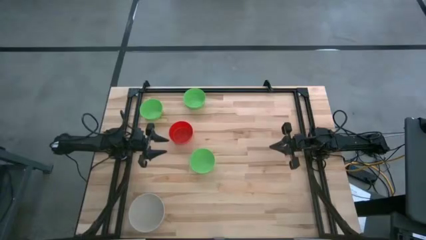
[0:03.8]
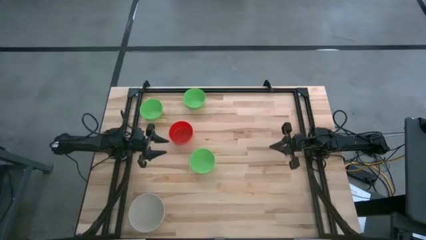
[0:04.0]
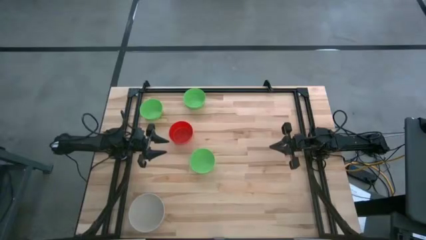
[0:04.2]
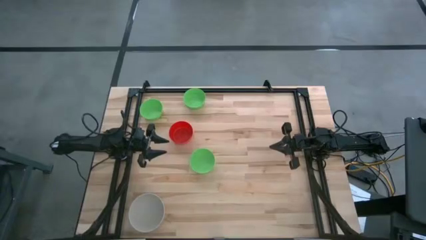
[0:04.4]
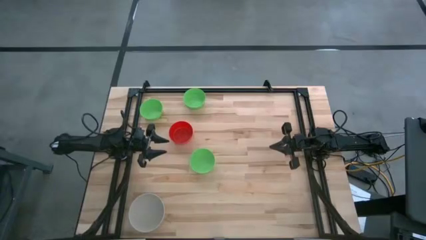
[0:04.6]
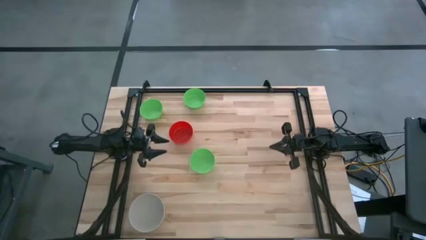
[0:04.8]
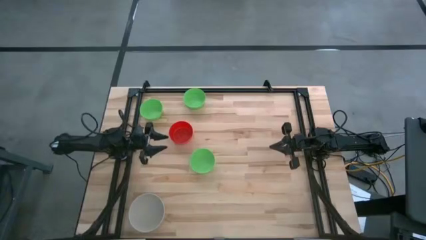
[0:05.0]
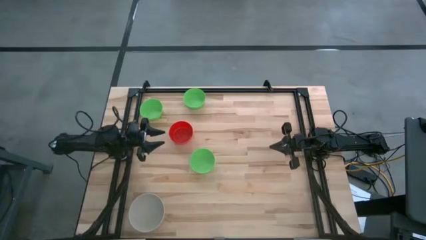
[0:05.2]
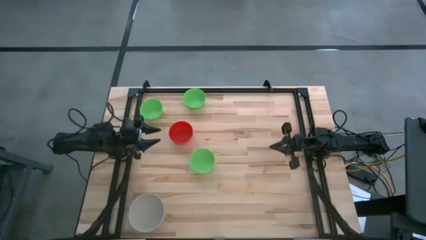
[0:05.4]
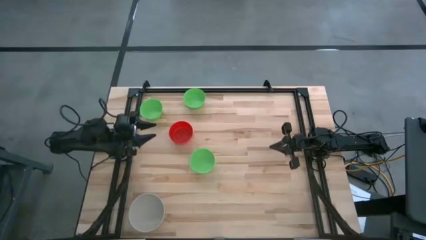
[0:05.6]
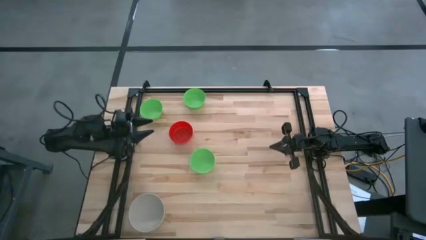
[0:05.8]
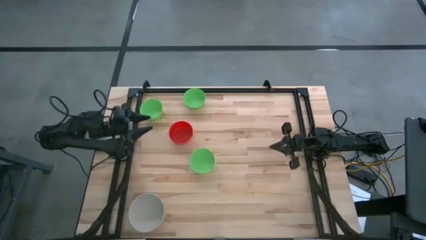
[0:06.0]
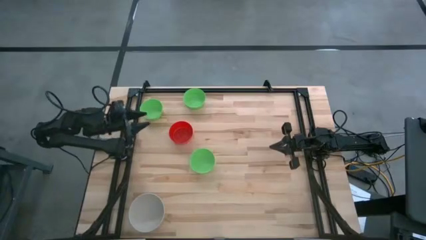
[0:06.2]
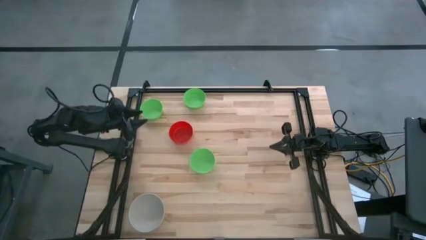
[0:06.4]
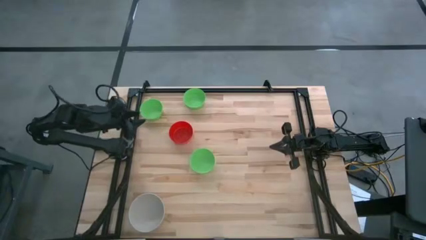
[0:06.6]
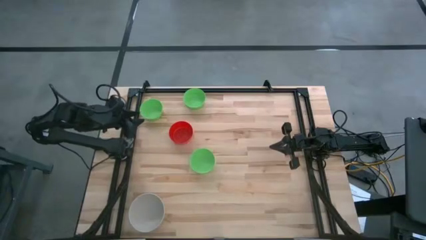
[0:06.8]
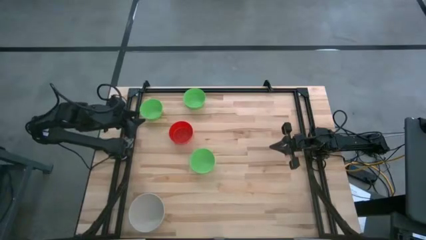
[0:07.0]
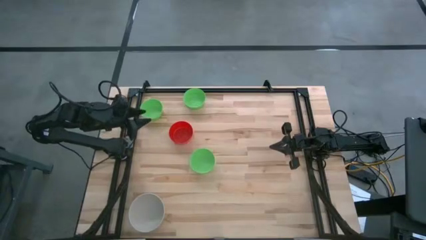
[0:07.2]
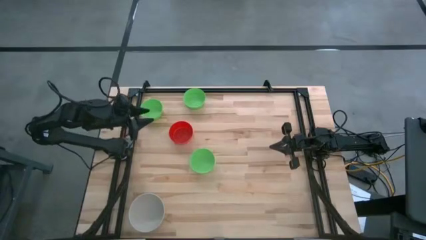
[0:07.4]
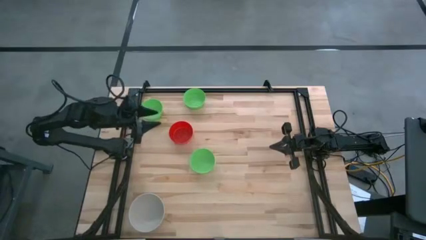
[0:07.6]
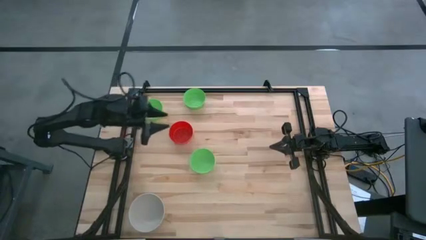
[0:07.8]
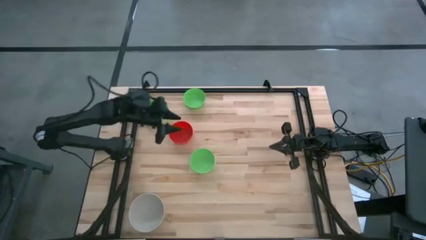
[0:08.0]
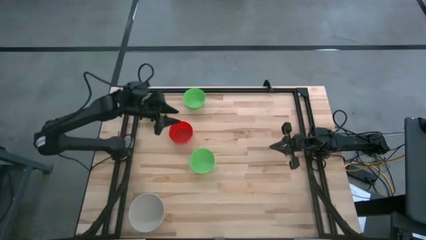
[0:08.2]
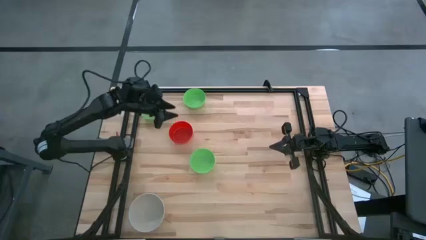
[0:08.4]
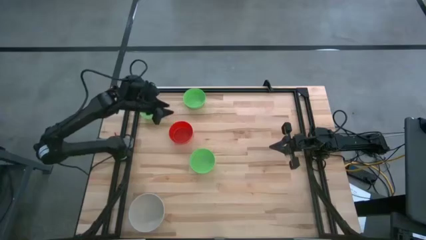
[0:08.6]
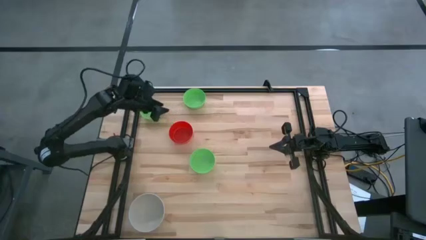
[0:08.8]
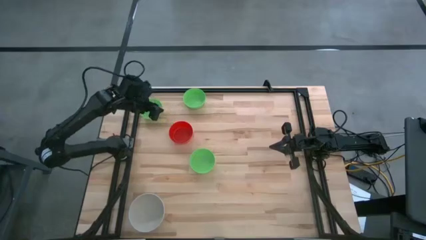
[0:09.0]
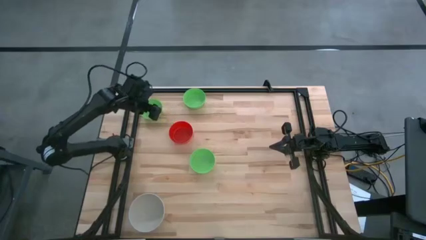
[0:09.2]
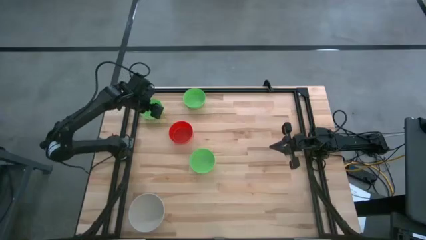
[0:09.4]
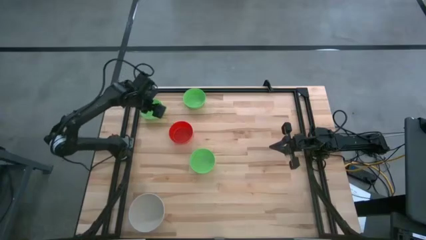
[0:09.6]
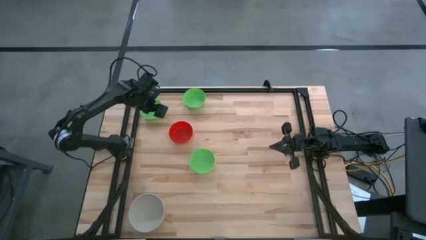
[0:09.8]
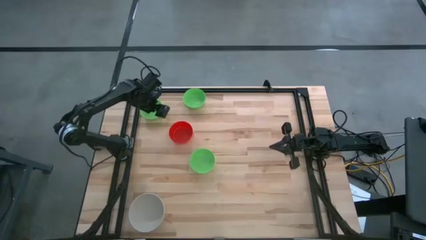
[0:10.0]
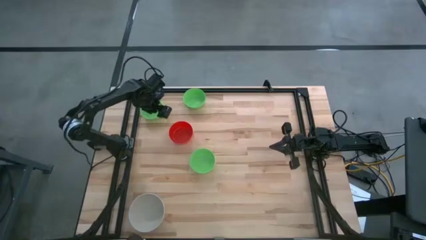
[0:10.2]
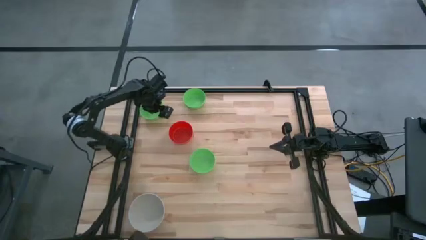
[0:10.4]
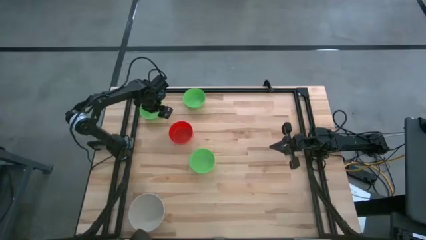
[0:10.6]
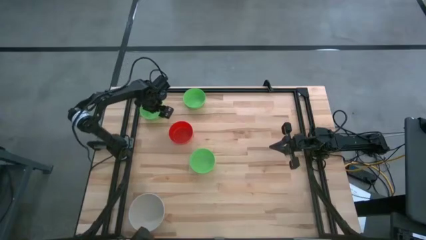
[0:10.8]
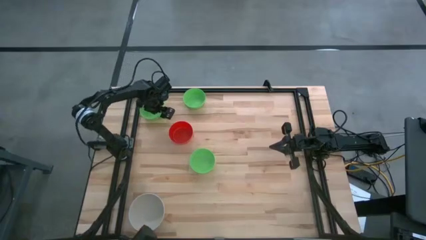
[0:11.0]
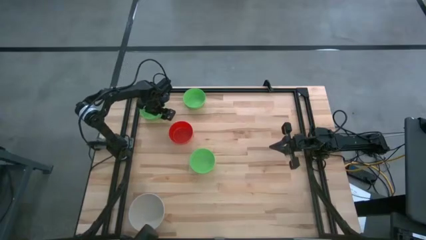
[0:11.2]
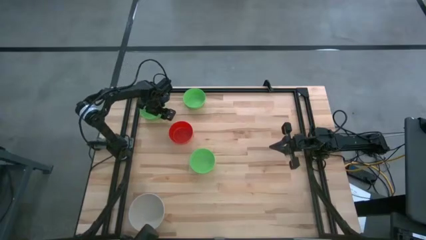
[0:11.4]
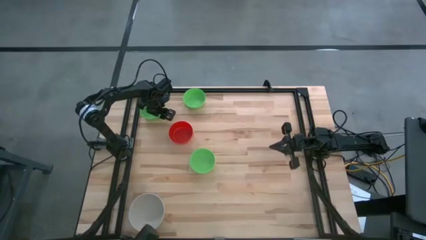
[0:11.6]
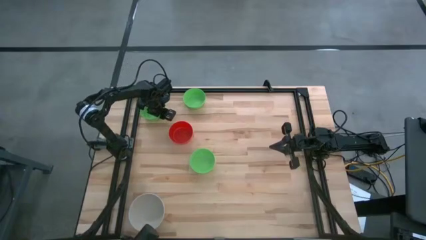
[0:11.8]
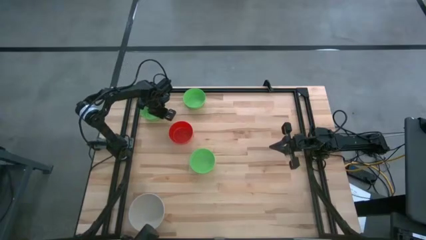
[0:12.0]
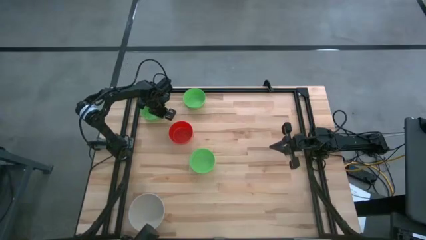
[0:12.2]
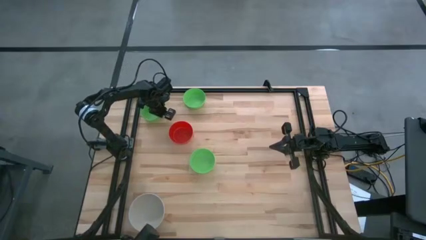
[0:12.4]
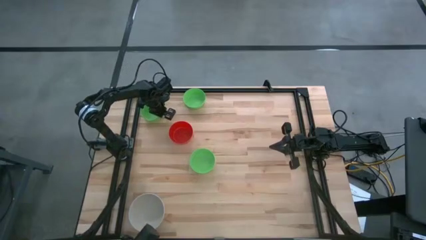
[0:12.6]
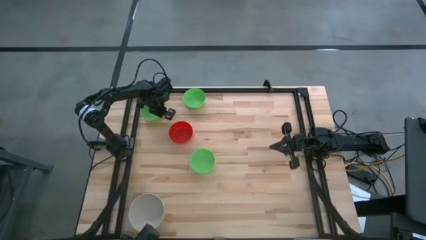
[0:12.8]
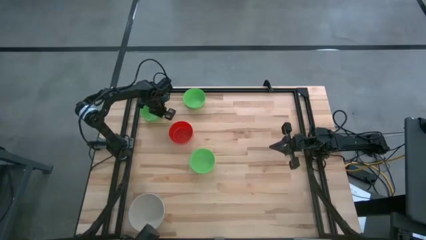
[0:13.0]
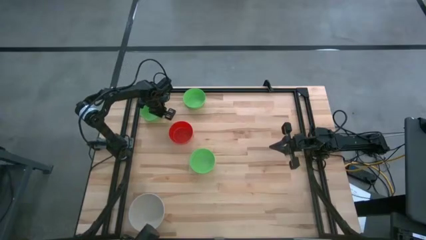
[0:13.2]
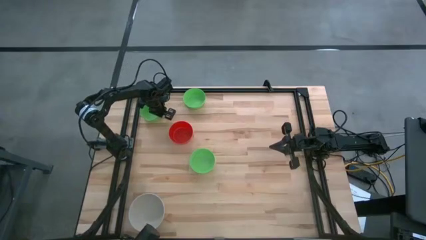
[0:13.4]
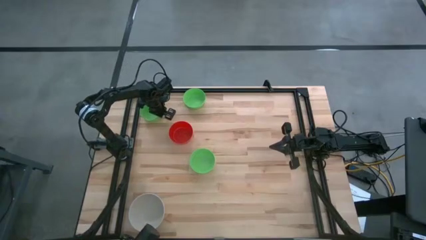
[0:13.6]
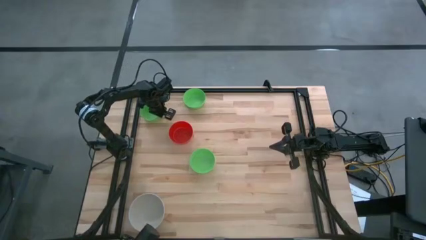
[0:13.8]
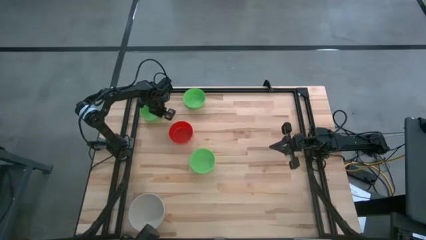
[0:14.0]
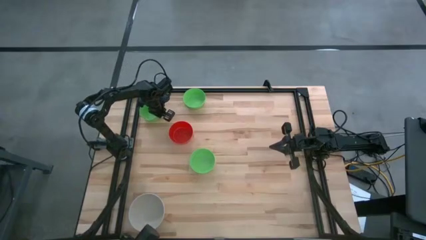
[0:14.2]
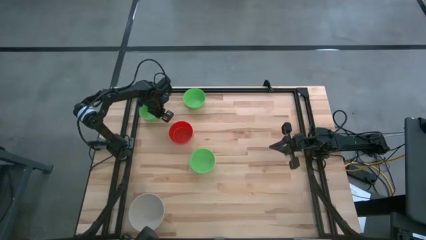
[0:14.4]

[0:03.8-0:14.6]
Stack the top left green bowl on top of the grey bowl

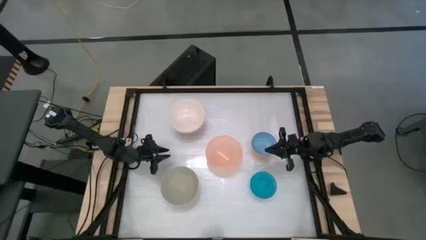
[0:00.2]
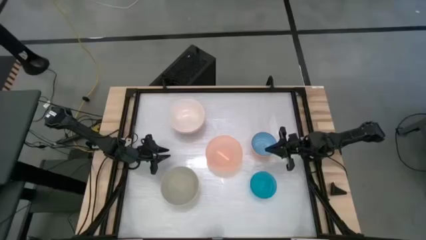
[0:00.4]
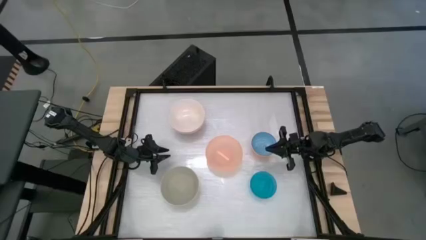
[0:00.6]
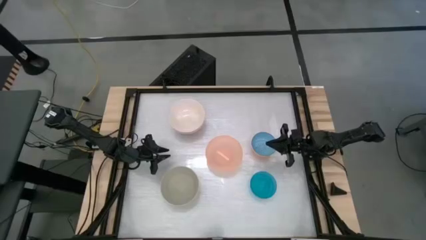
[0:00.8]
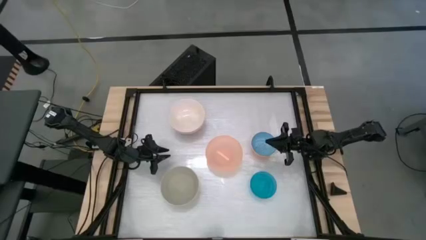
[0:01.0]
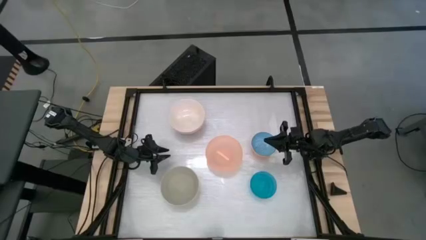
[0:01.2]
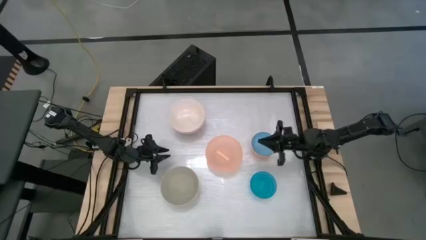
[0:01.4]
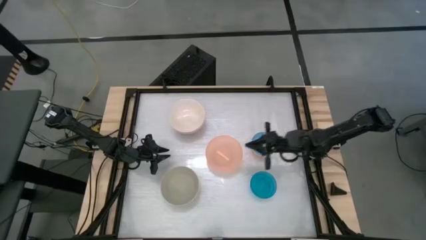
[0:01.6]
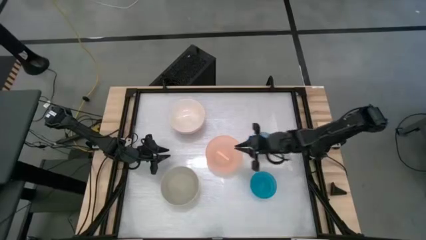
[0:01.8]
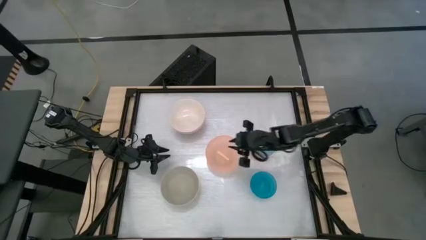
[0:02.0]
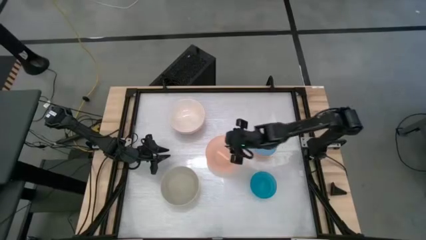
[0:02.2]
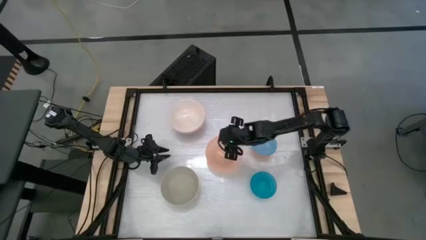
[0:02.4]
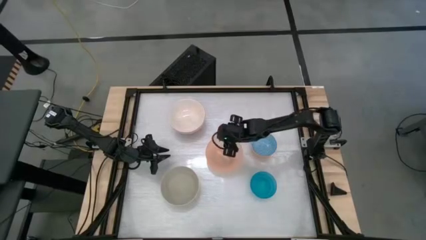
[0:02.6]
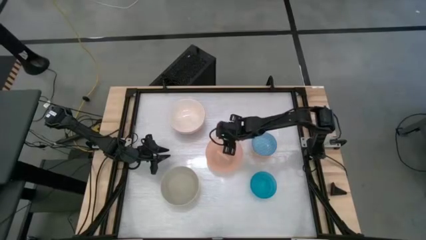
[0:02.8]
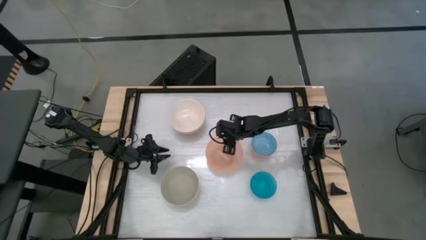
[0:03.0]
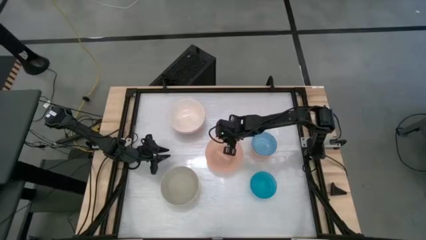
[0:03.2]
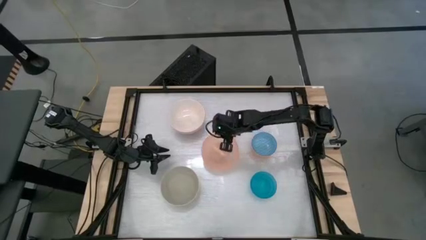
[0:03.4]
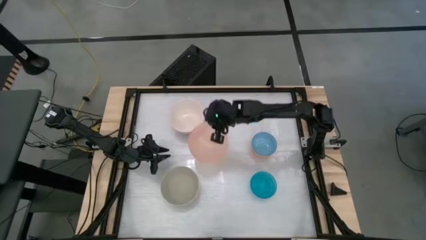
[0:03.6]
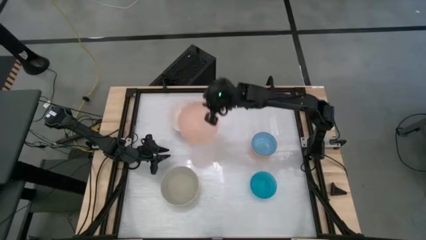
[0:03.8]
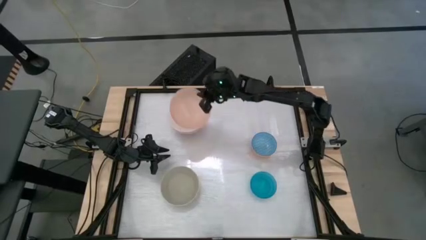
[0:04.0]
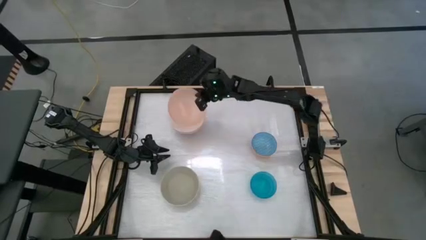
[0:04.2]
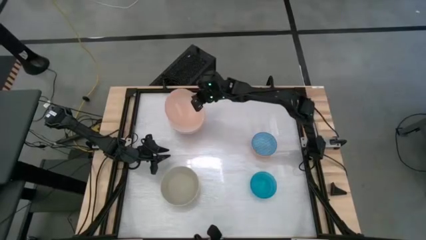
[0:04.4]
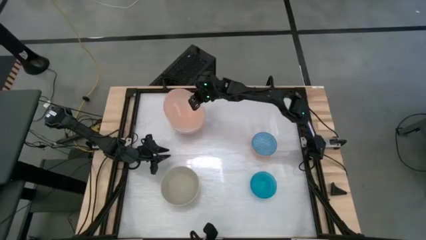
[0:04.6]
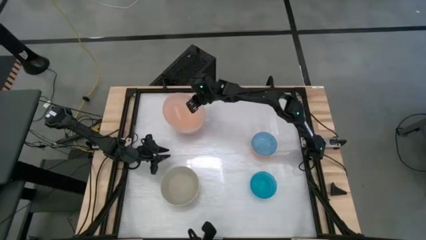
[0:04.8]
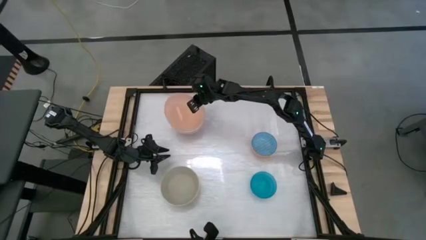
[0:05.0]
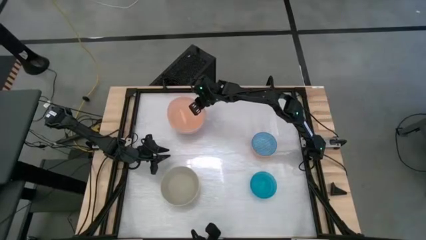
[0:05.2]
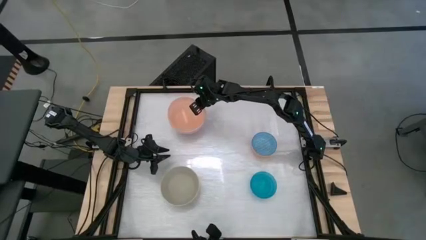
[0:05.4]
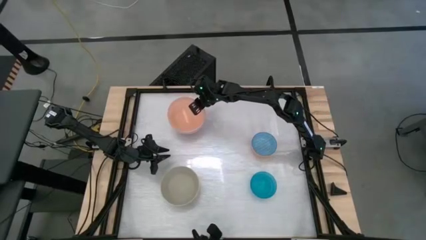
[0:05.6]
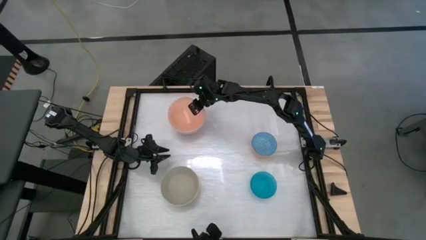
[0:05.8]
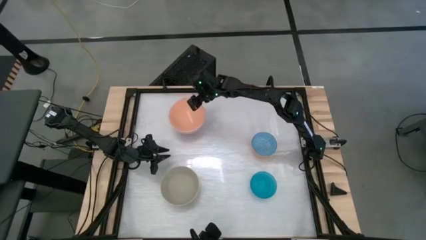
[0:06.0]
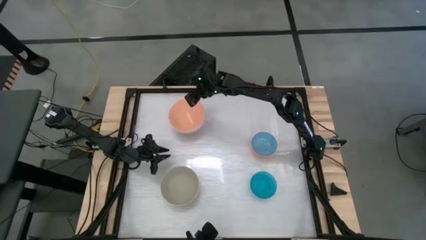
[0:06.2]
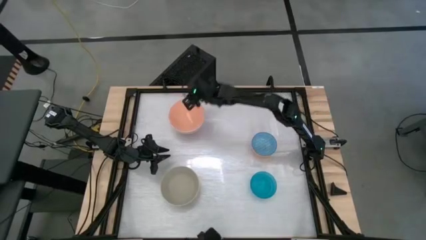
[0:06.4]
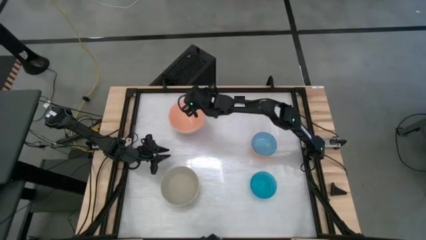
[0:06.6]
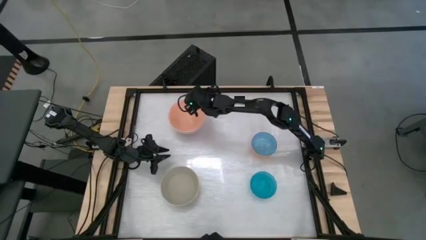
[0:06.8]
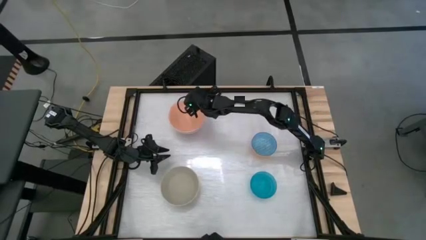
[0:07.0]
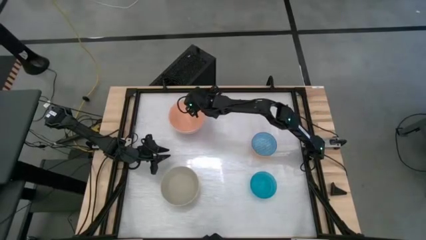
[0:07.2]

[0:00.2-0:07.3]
Stack the light orange bowl on top of the white bowl
